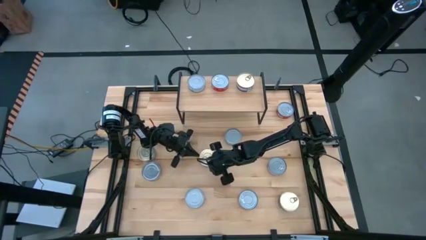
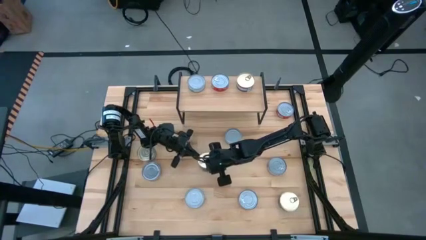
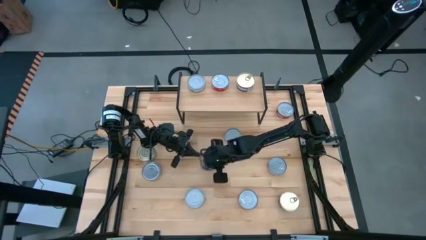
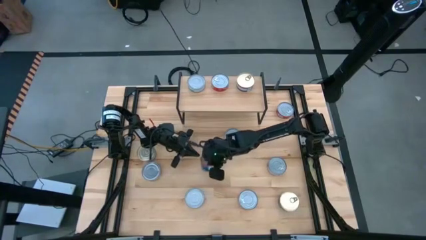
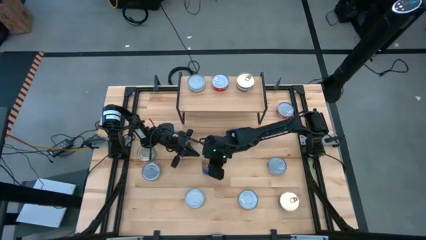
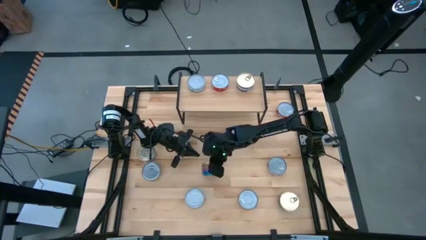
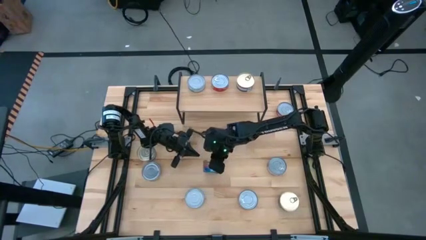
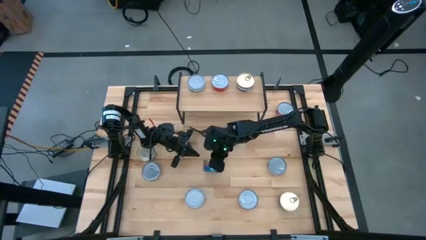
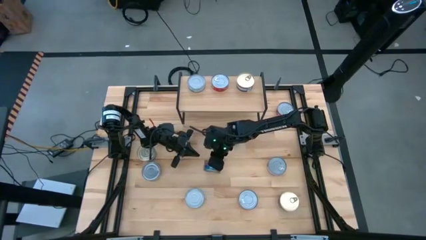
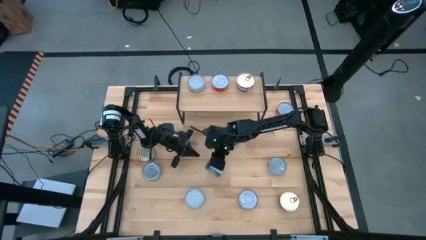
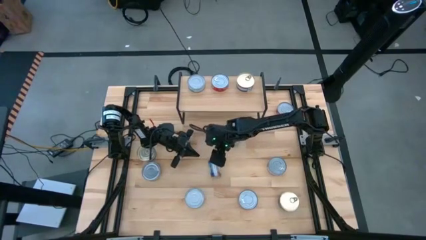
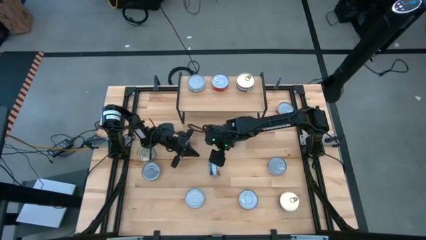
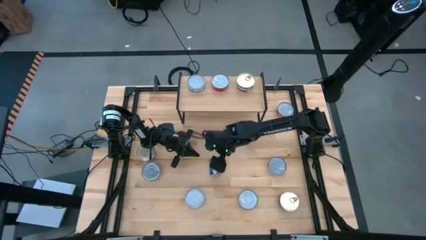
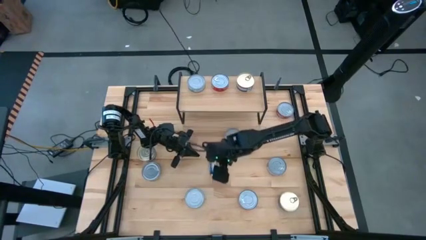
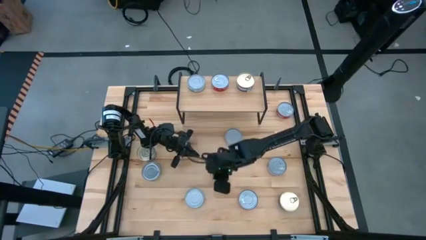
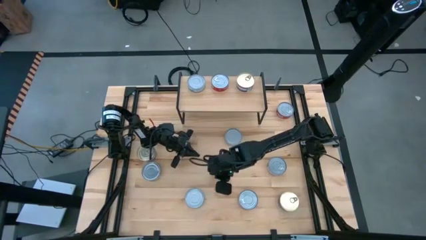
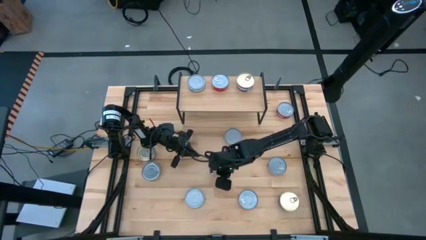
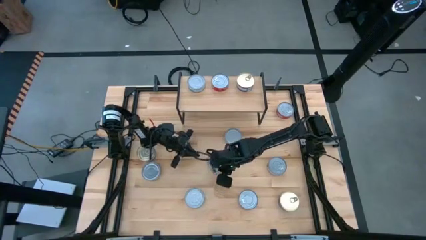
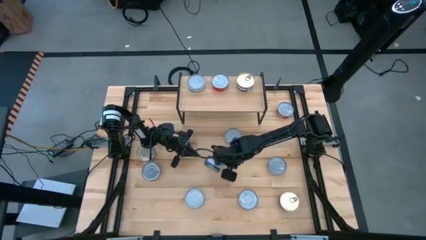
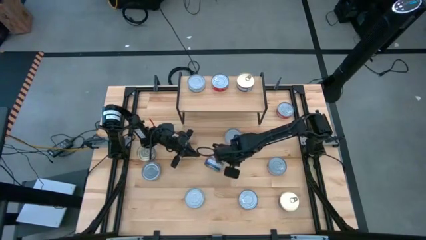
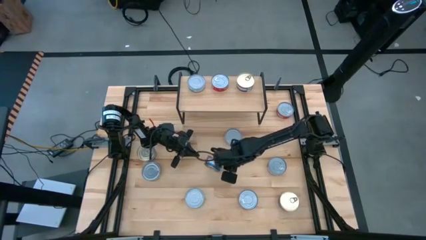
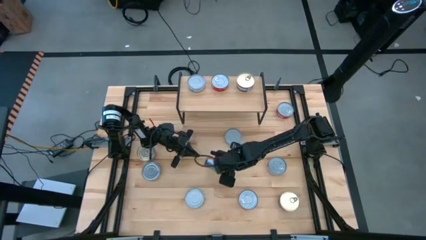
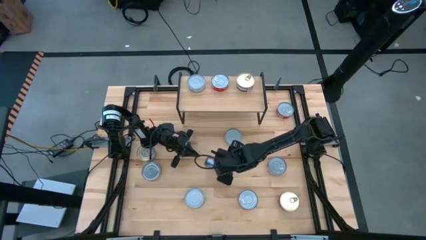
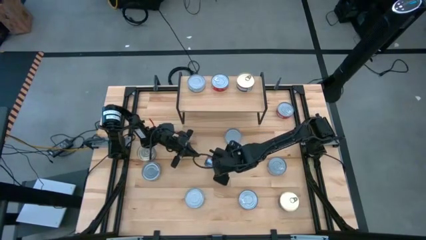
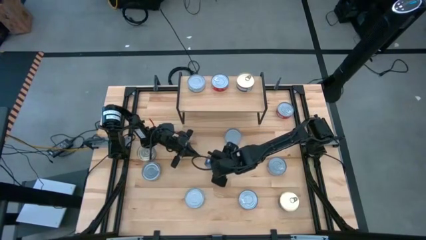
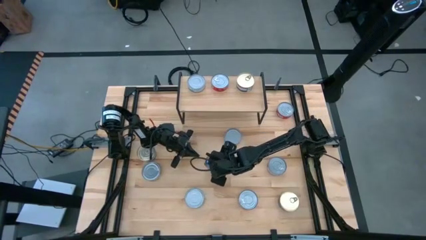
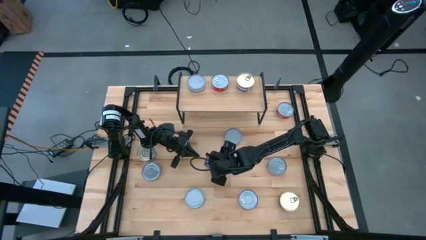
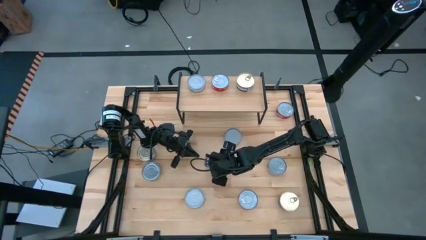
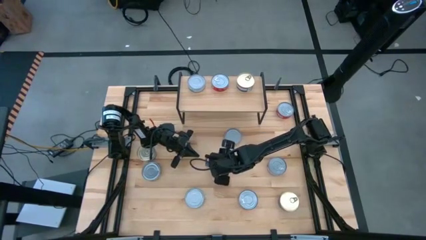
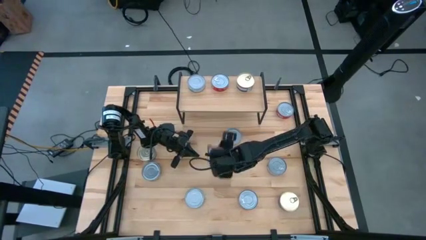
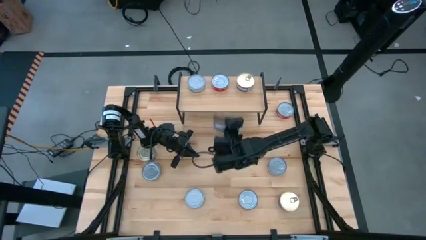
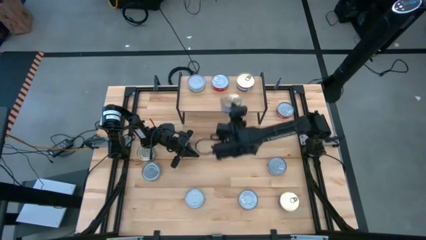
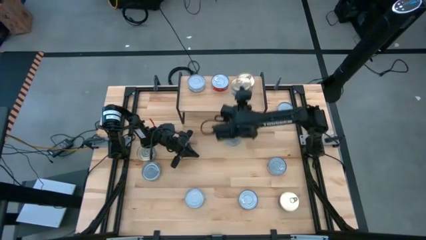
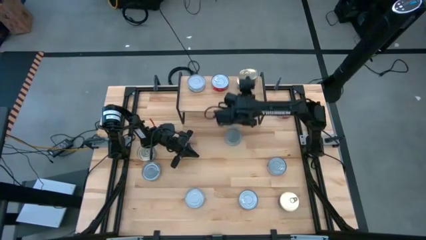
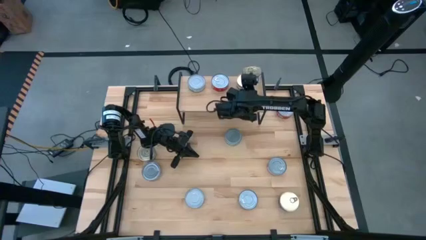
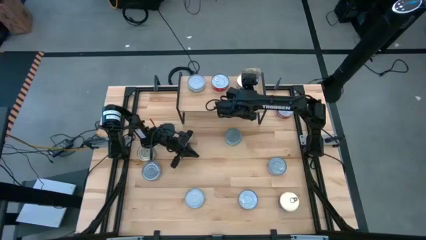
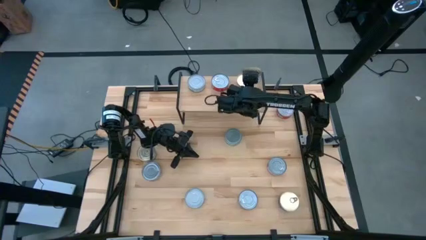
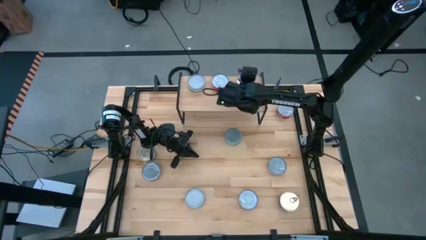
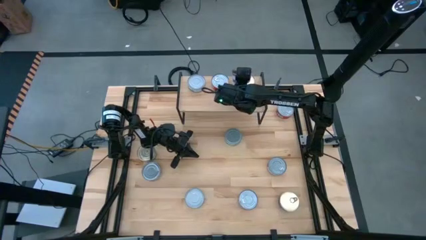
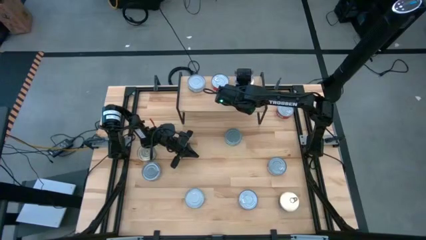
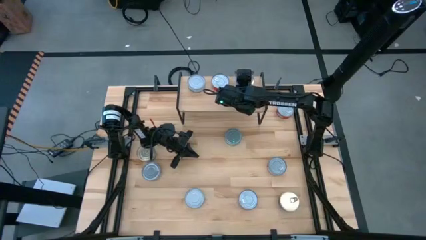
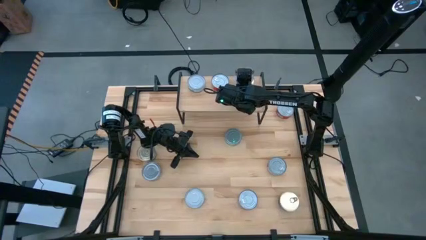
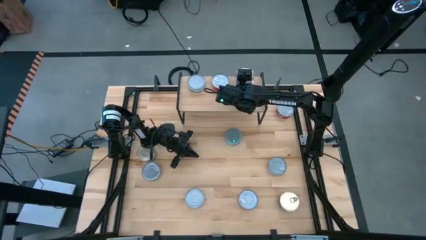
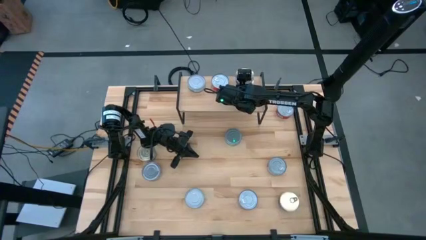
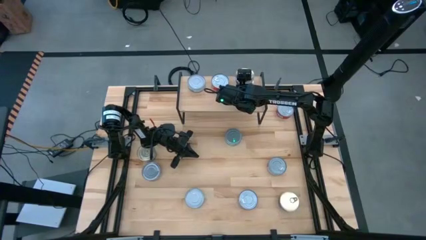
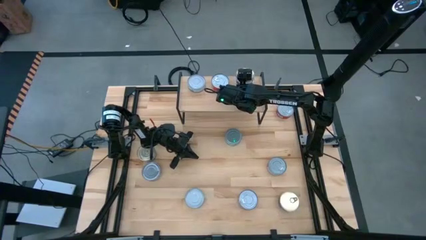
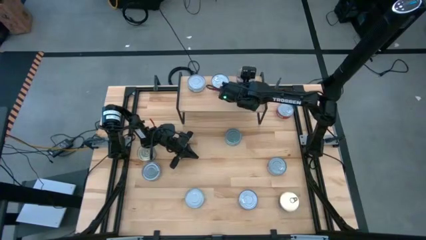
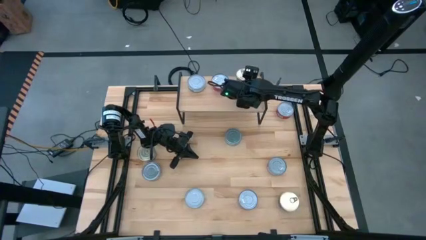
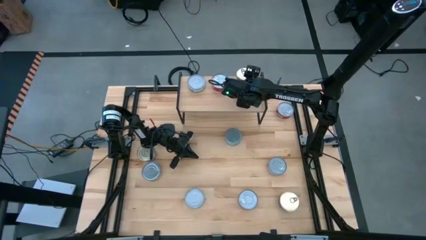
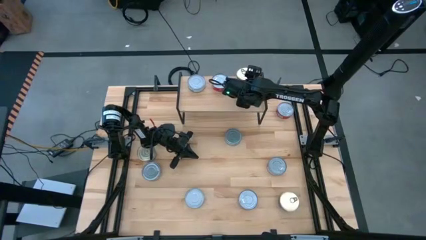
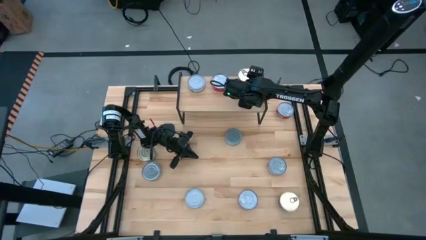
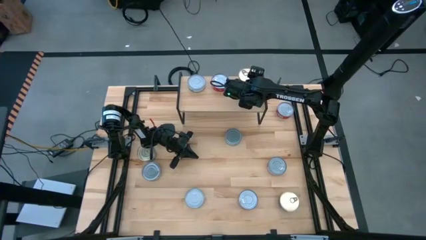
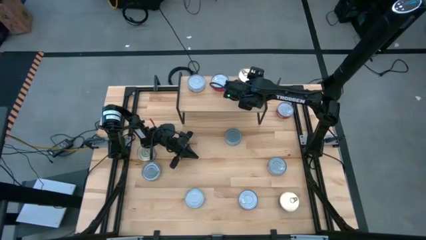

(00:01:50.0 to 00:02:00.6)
Task: Stack canned seafood by type on shelf
Stack the blue and pink tuna can on top of the blue and pink tuna can on the shelf

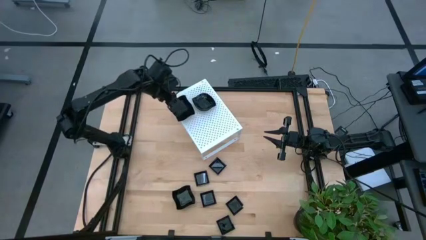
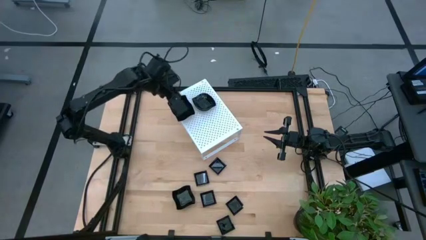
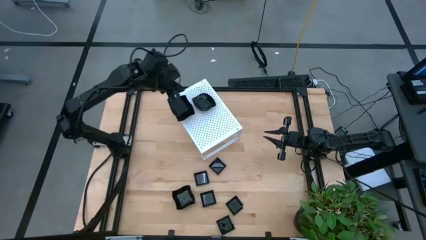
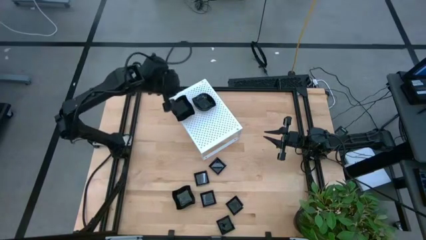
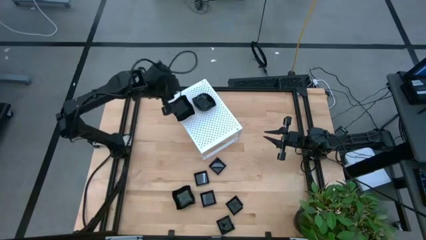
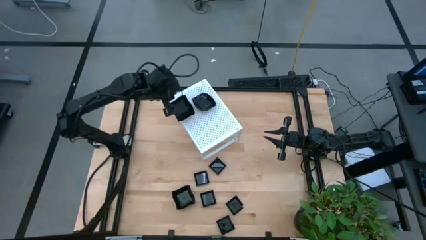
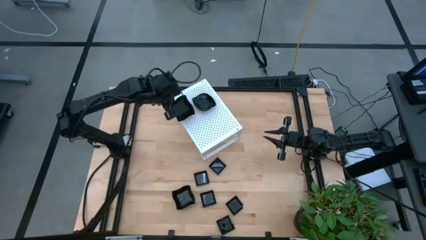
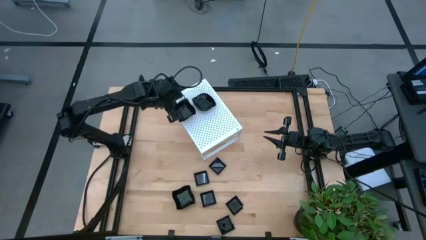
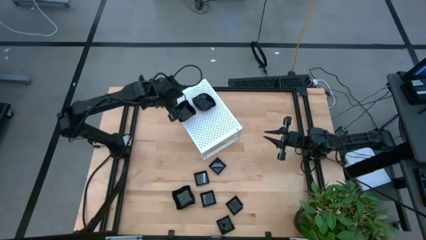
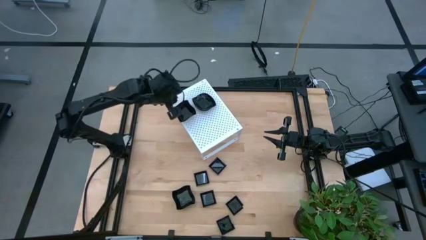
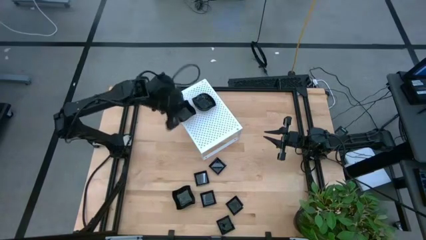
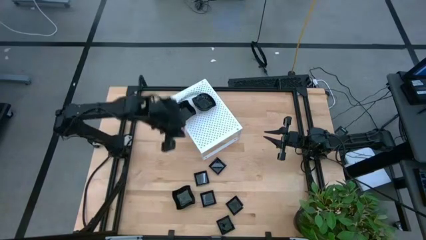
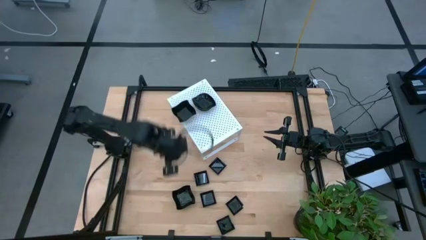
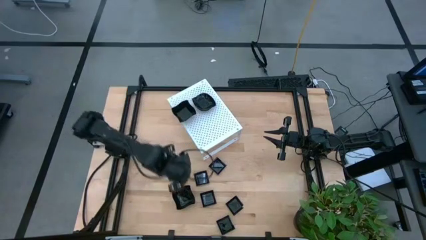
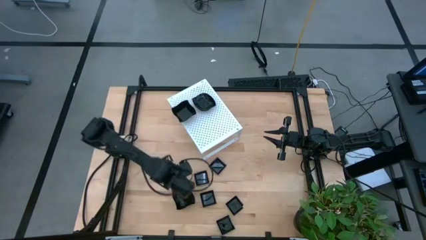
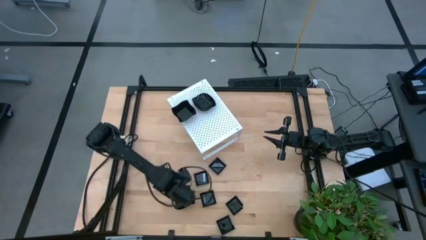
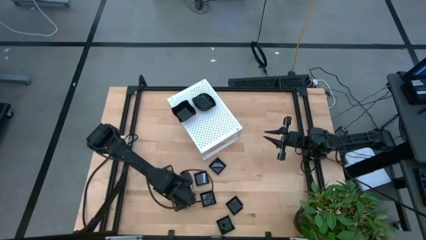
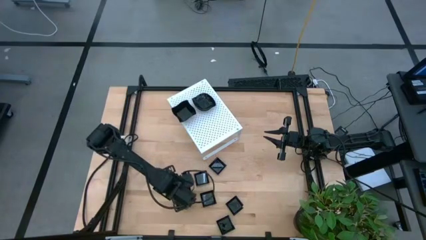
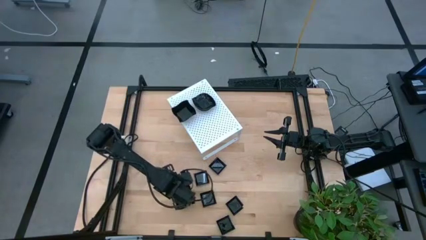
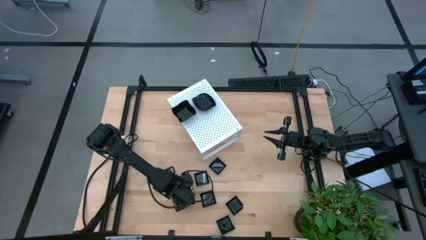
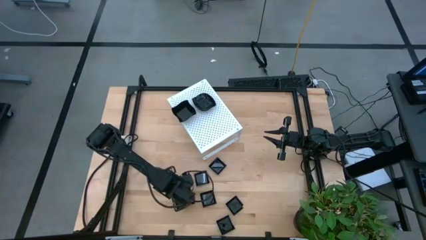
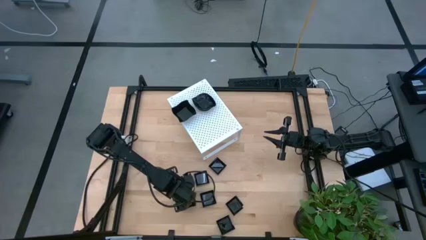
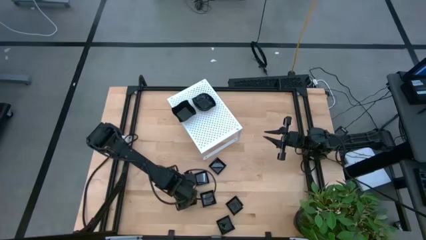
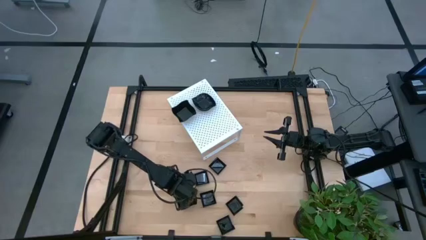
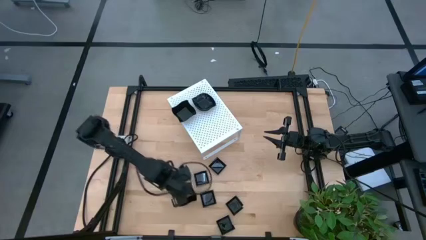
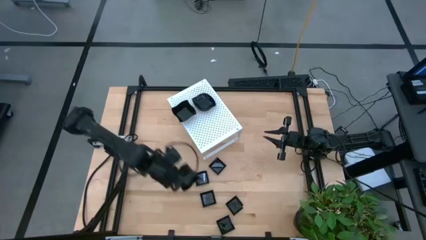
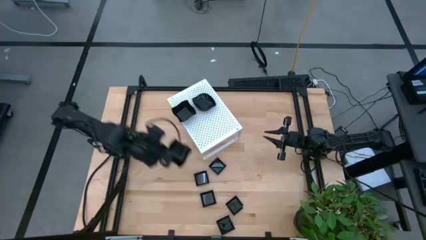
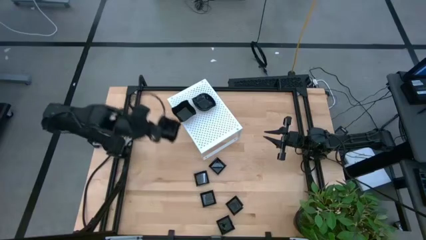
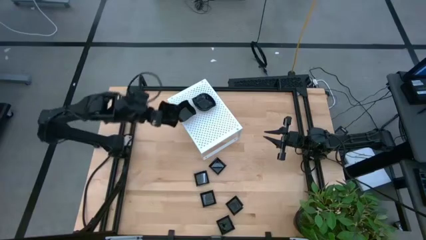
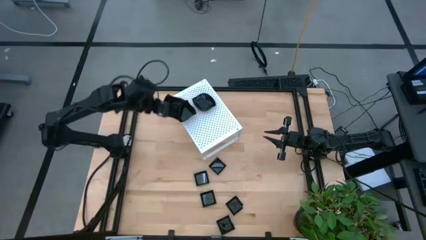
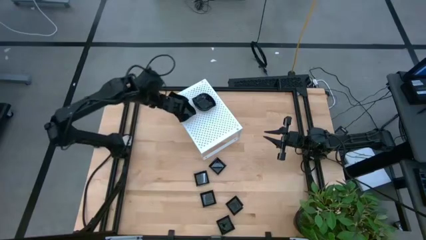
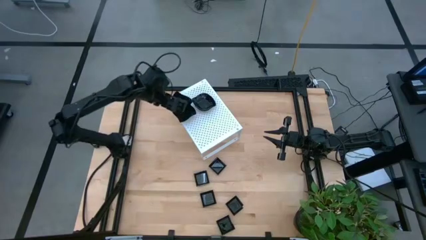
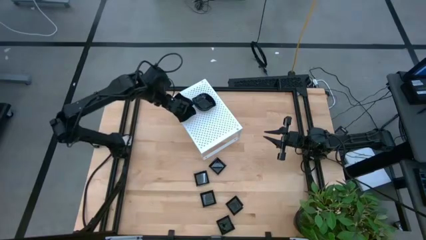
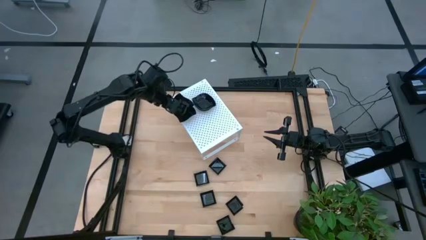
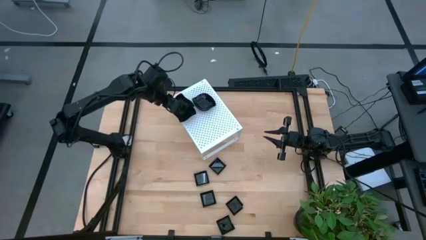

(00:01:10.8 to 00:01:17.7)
Task: Pick & Place Mini shaped plates
Stack the distorted square plate on top of the stacked distorted square plates on the shelf
